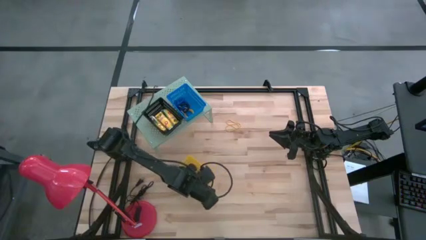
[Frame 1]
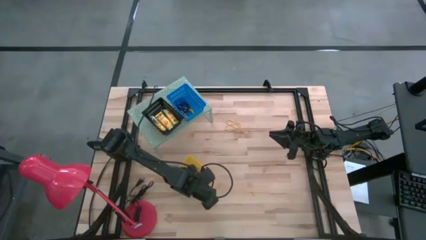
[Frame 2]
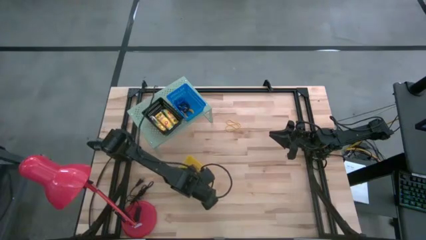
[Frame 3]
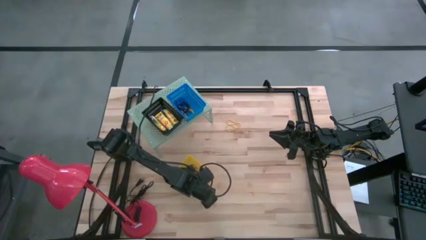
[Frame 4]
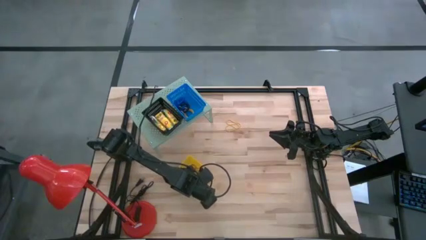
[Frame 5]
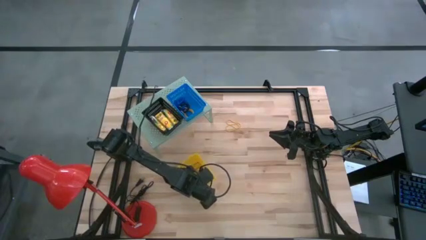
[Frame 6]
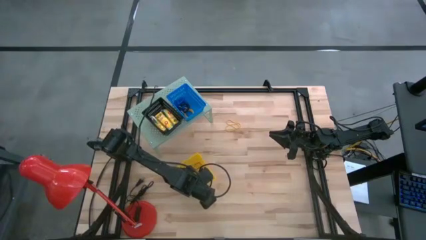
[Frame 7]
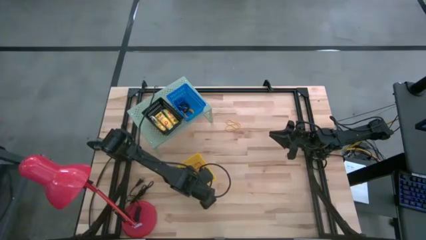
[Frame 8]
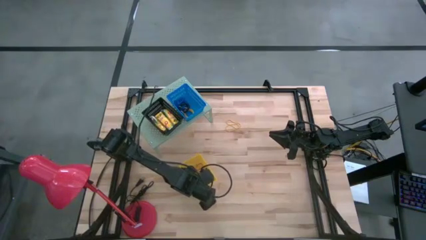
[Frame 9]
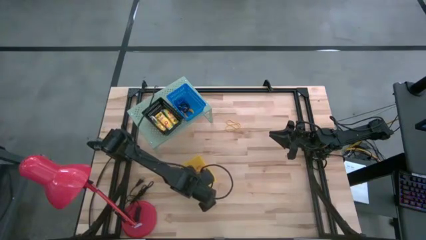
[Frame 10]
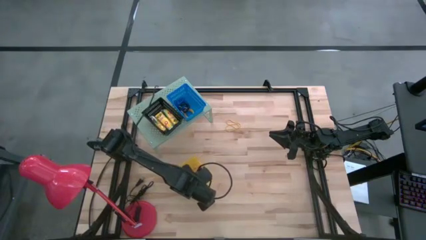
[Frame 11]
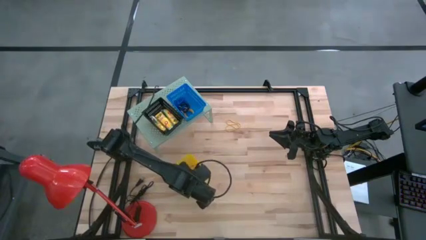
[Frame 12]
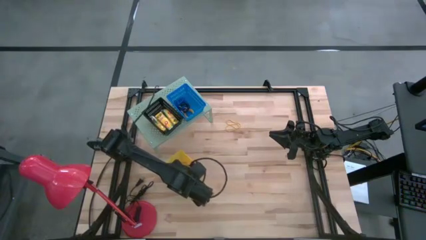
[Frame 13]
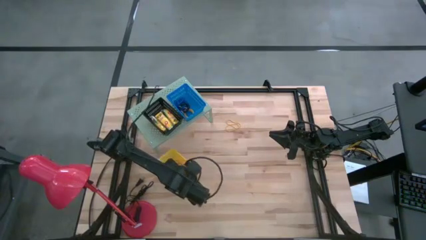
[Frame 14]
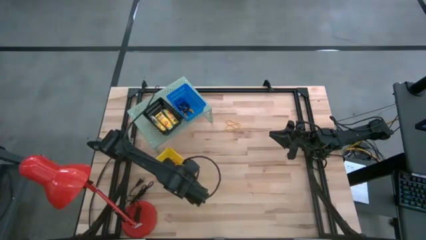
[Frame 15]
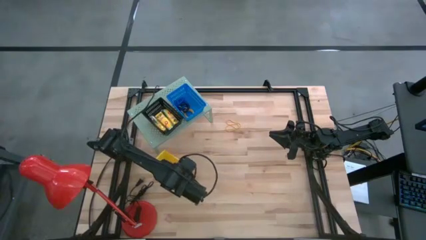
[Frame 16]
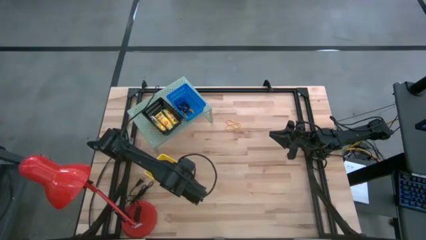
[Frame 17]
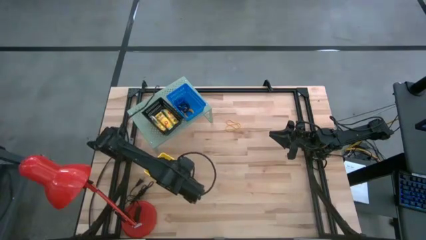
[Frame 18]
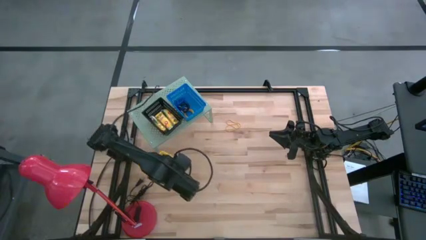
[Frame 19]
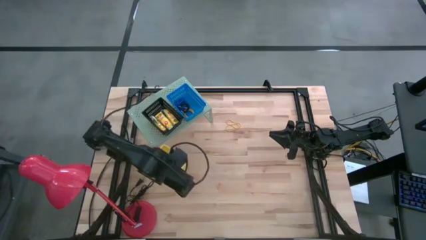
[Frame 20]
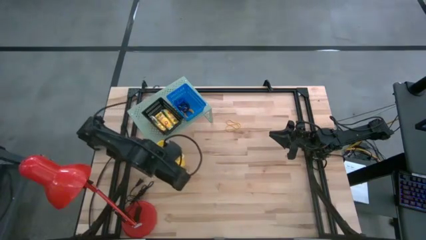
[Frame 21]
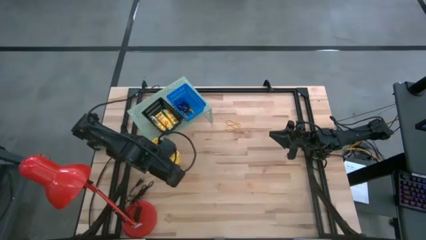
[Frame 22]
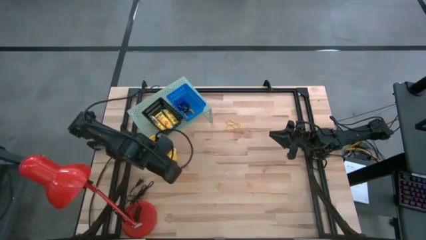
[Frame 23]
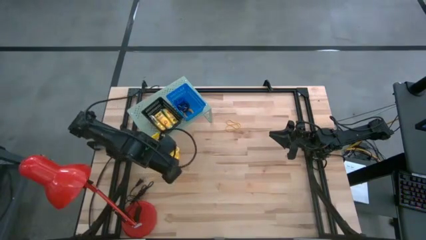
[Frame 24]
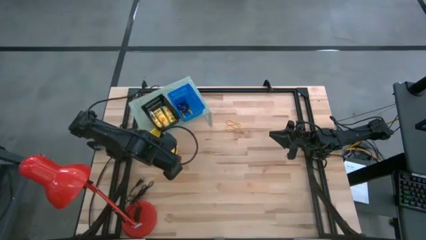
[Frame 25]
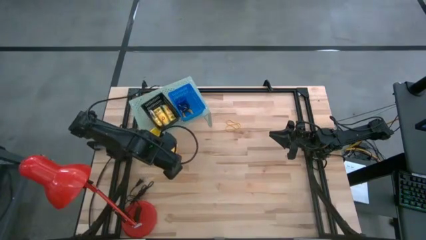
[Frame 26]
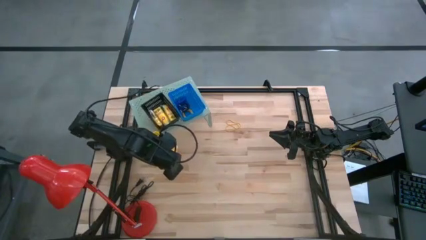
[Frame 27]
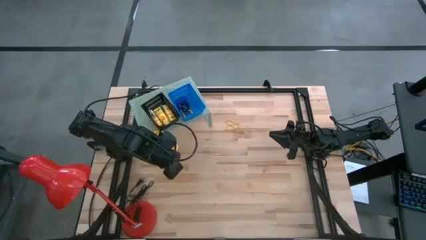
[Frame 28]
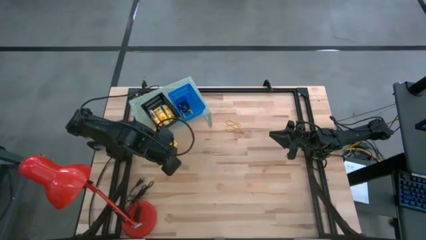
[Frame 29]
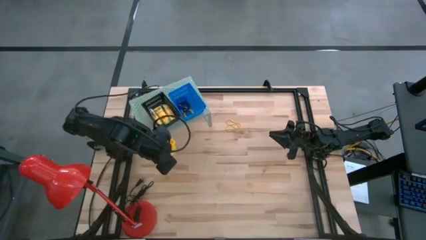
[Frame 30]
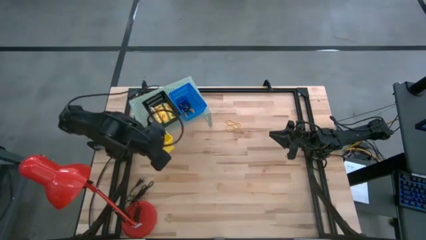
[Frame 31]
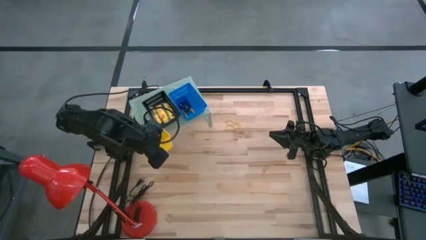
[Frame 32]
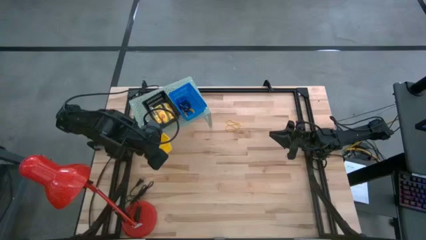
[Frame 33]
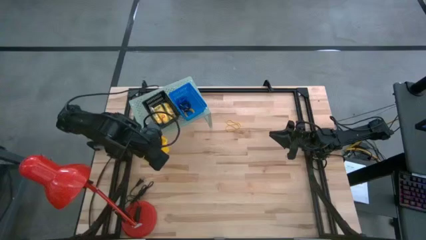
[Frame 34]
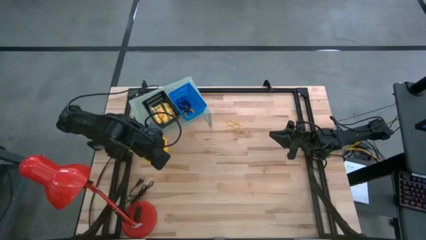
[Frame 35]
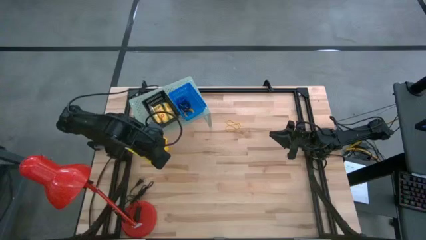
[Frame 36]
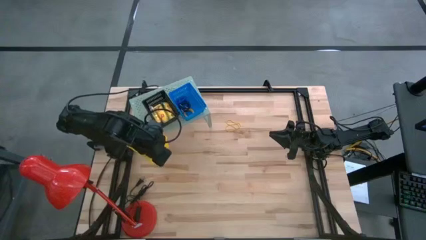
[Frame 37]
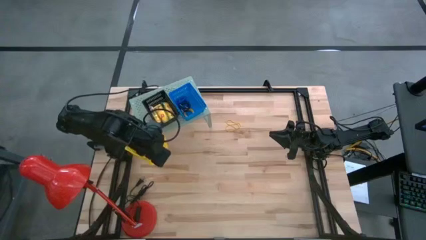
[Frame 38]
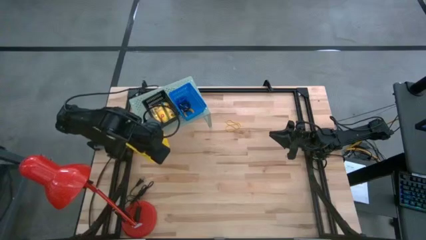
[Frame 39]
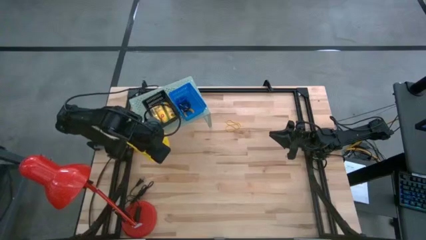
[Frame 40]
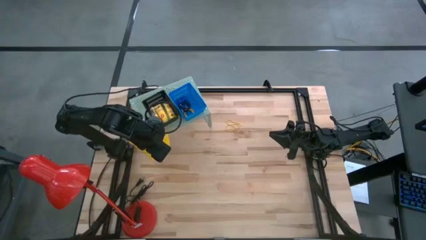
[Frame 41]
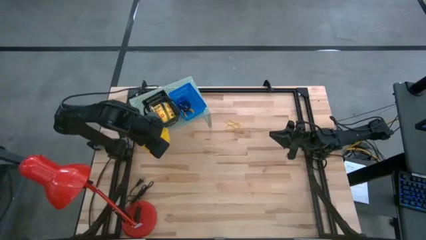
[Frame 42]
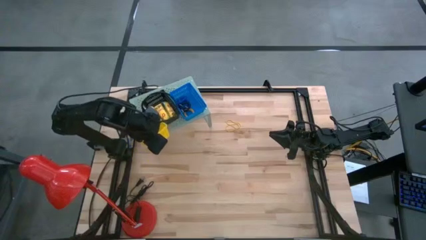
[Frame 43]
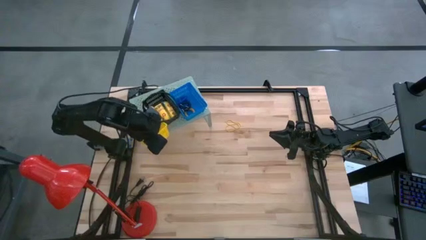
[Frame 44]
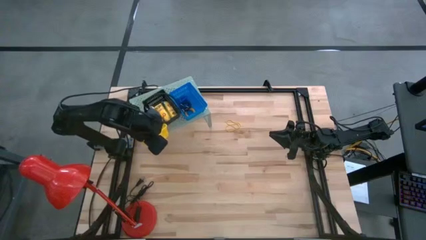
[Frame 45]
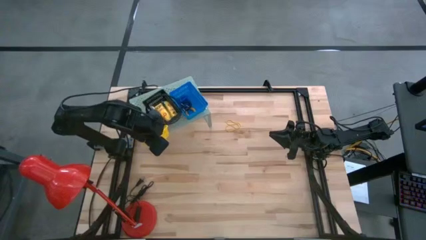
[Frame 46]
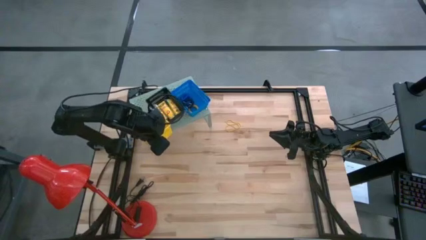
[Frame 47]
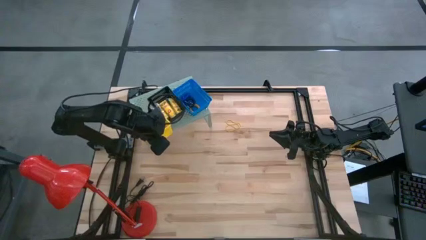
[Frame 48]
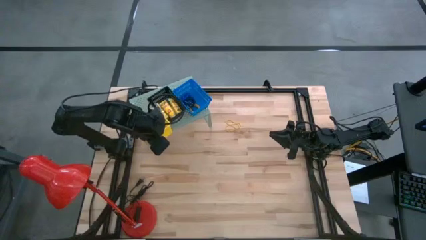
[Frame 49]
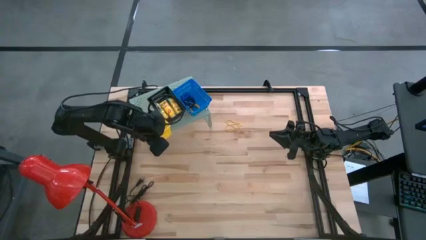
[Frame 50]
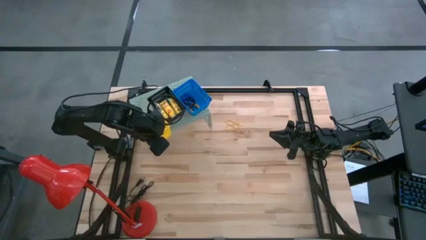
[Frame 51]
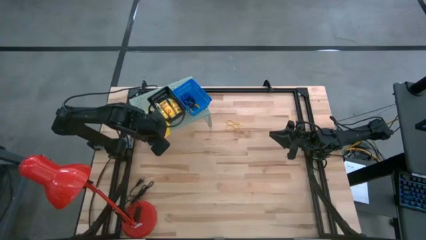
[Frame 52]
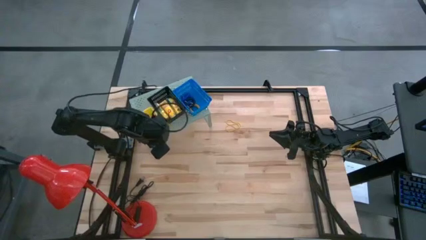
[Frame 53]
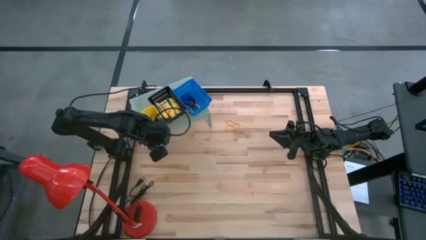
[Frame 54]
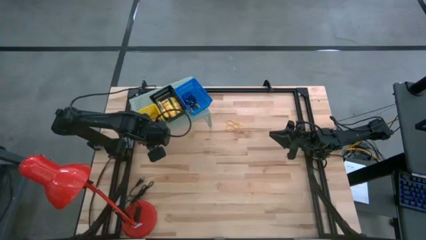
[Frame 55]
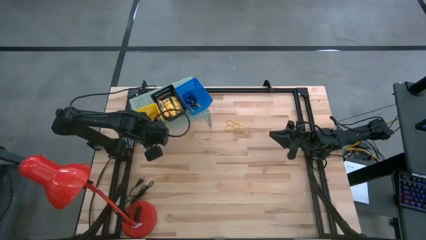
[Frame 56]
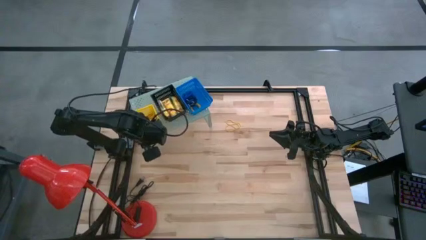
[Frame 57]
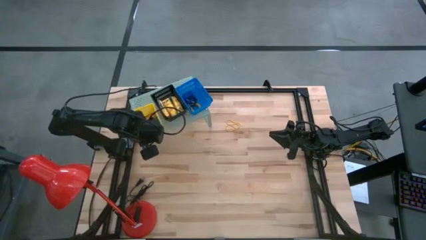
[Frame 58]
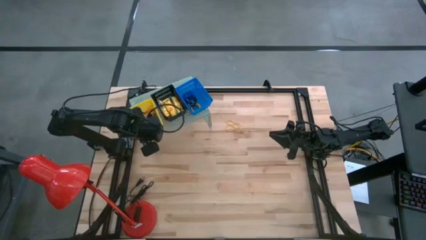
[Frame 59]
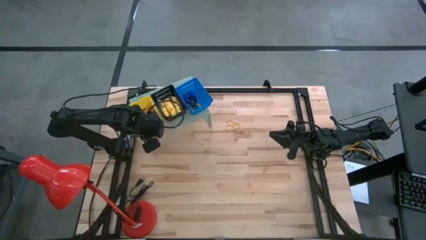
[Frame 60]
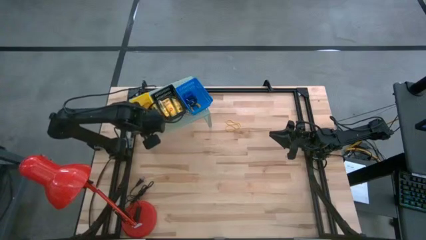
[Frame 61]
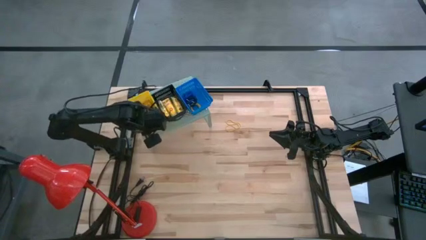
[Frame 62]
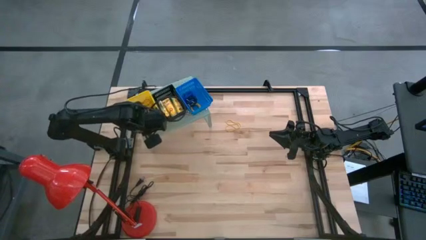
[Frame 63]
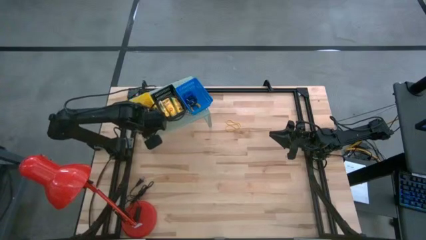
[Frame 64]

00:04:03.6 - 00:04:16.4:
Task: Pick & Place Office Desk Supplies
Put the yellow basket on the shelf

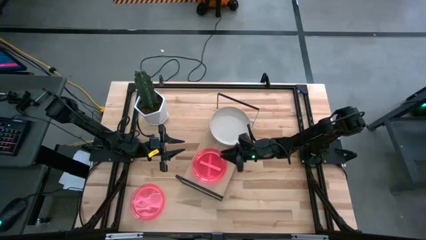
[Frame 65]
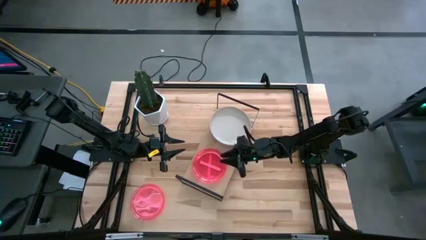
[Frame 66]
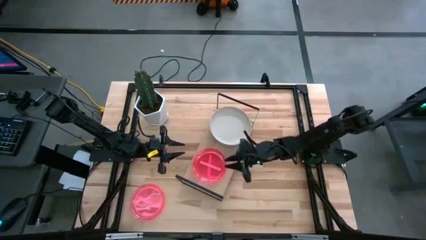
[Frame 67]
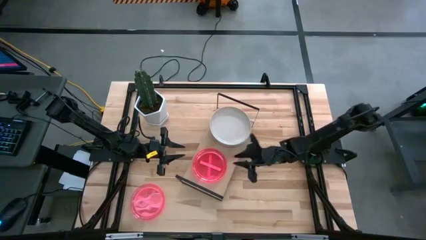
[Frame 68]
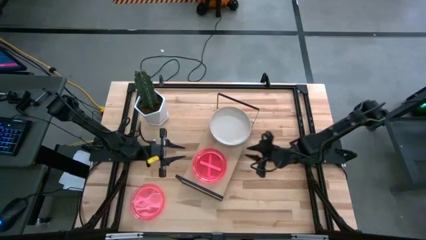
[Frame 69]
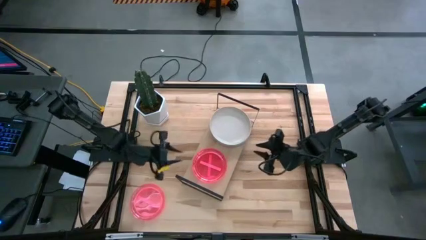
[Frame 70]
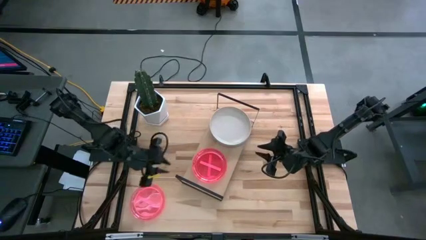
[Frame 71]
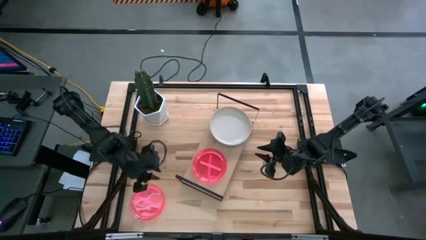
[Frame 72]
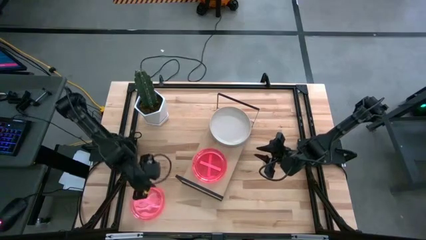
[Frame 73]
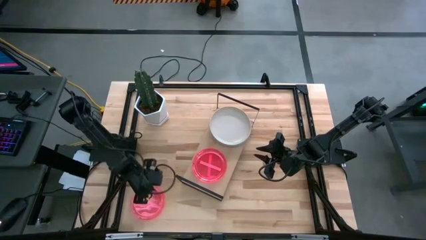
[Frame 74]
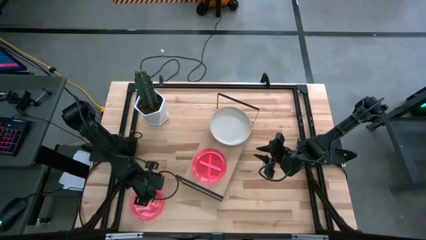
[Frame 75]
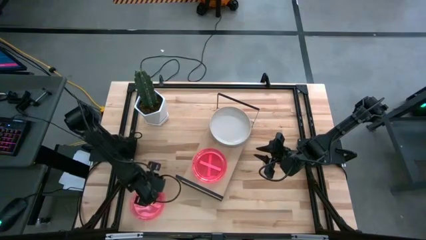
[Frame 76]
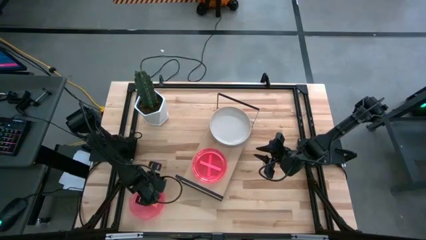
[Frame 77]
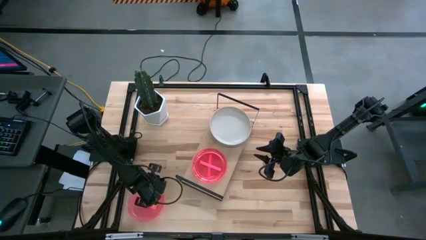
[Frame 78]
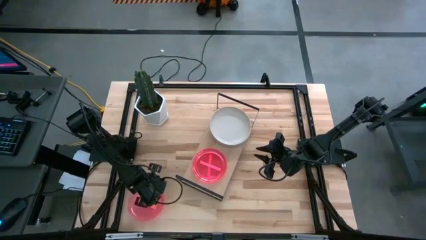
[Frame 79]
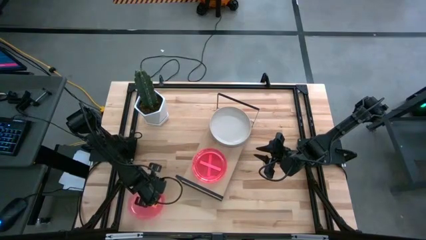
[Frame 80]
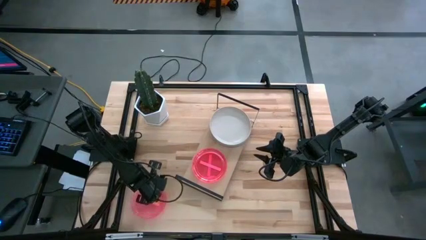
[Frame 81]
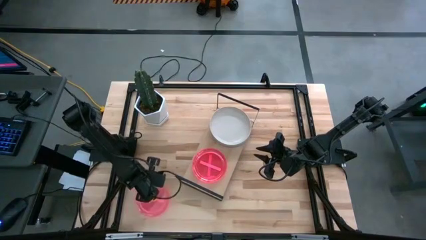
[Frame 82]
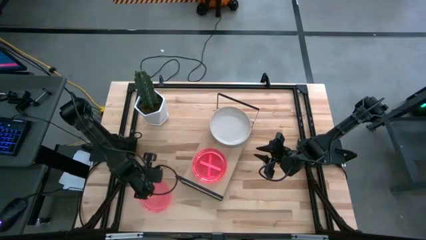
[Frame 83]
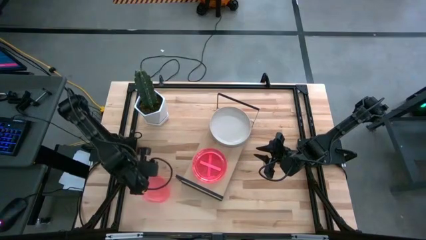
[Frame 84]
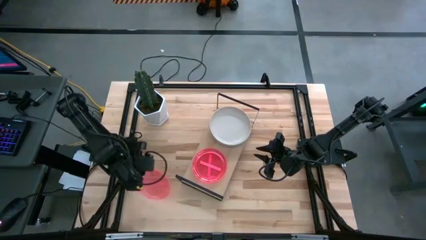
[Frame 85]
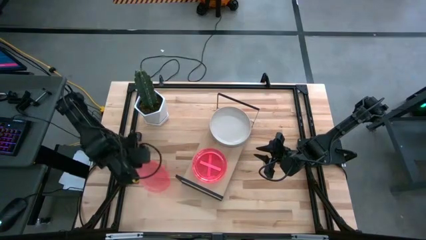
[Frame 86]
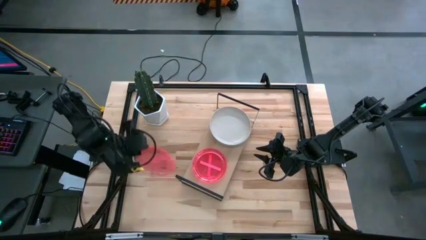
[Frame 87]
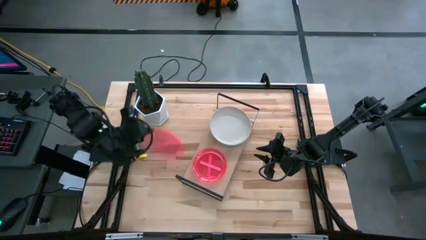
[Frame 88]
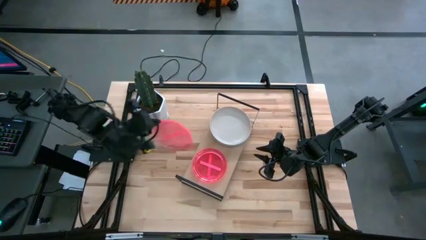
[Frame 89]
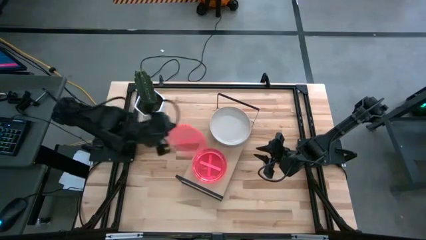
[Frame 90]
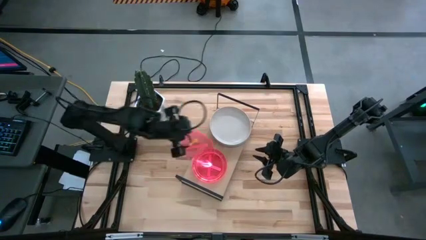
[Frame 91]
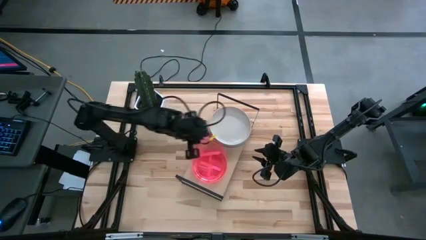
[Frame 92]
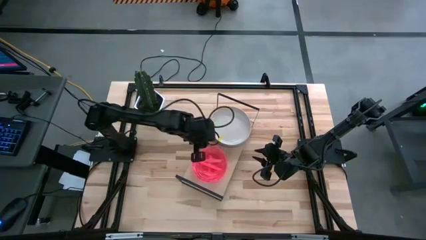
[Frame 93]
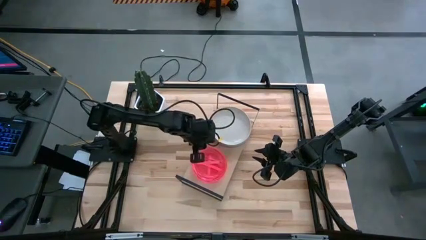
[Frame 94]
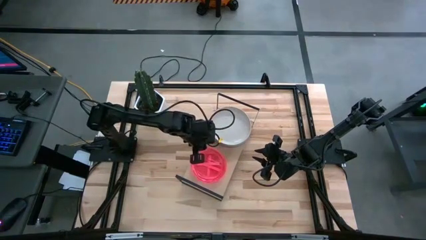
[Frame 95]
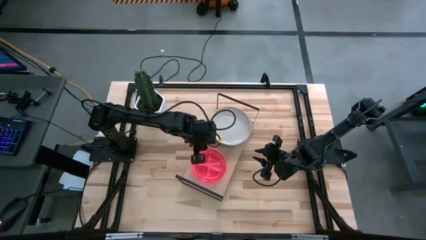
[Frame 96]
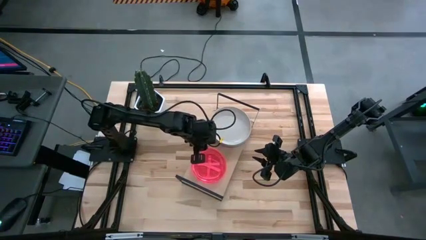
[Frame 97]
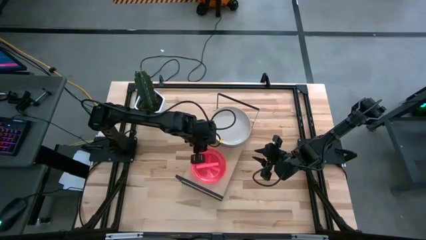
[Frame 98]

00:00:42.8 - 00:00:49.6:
Task: Place and stack plates onto a shelf
Stack the pink plate on top of the other pink plate on the shelf
